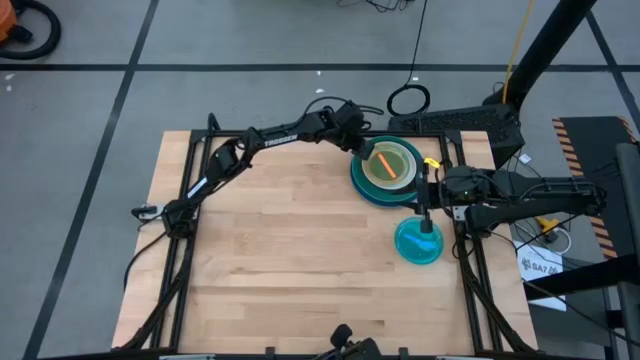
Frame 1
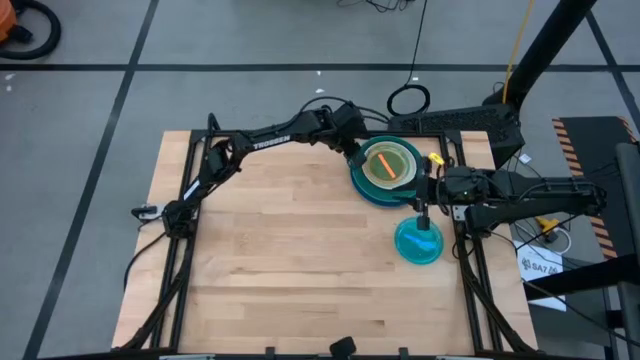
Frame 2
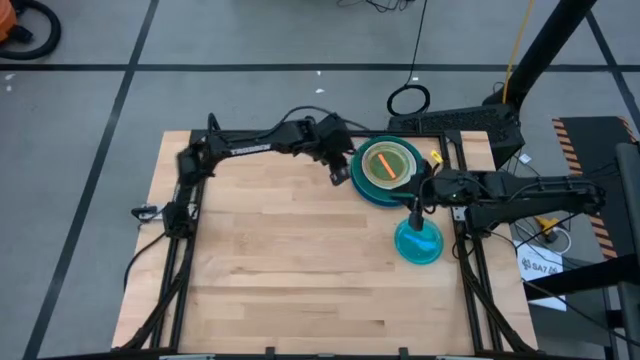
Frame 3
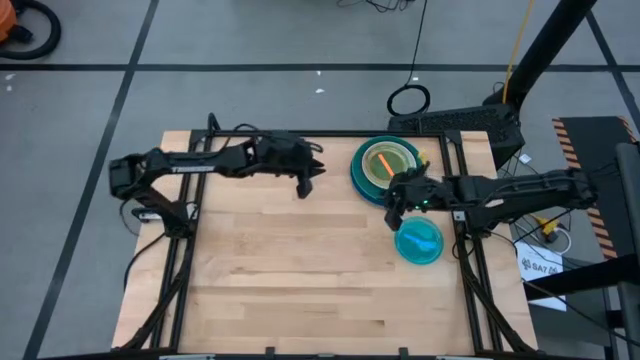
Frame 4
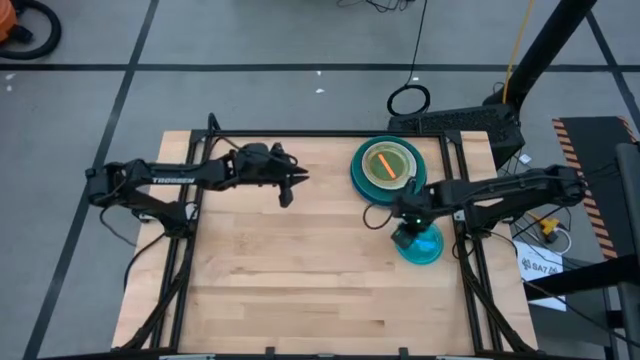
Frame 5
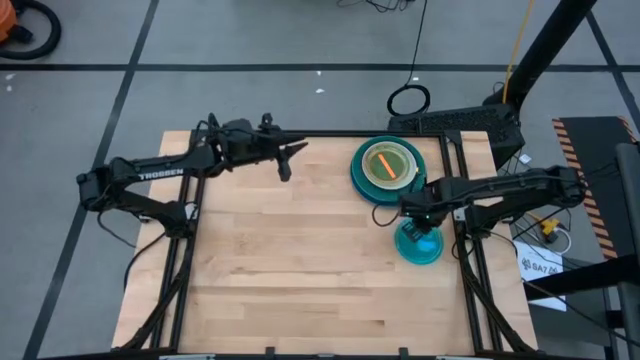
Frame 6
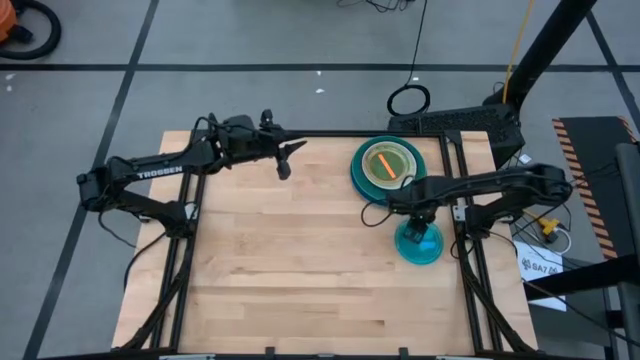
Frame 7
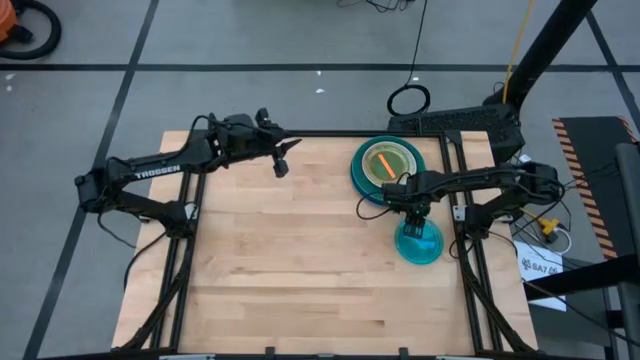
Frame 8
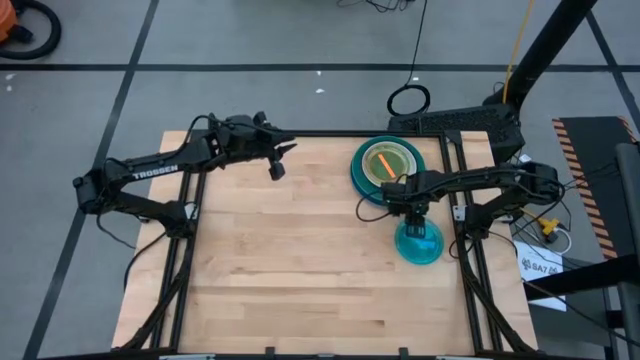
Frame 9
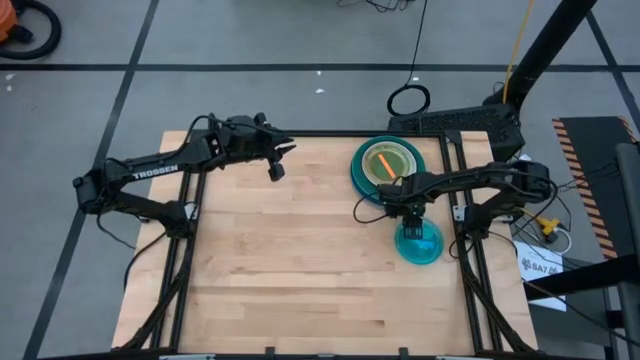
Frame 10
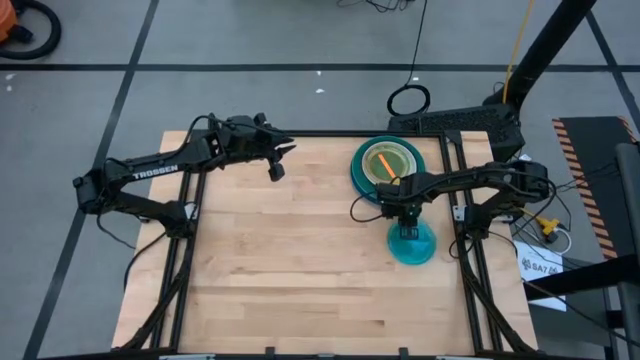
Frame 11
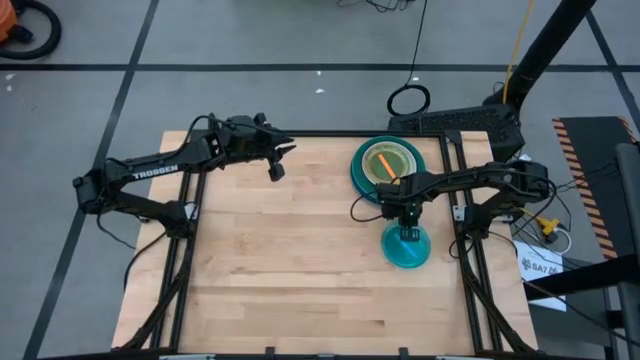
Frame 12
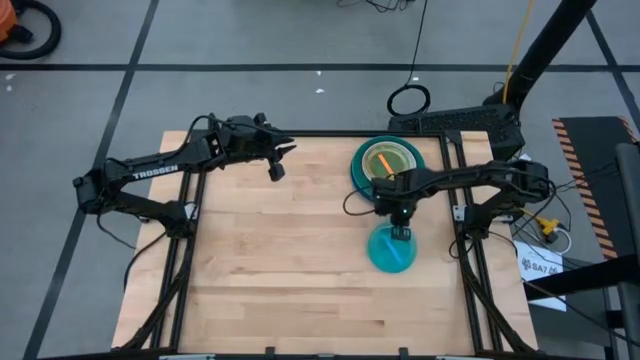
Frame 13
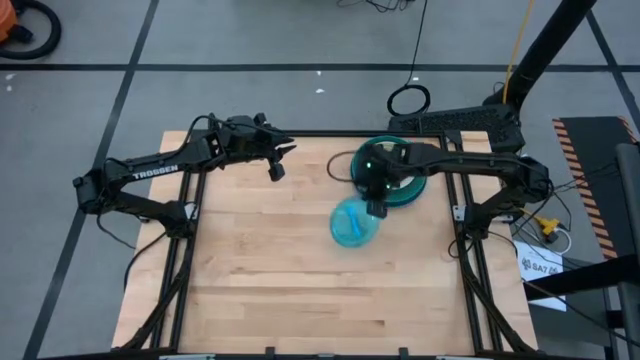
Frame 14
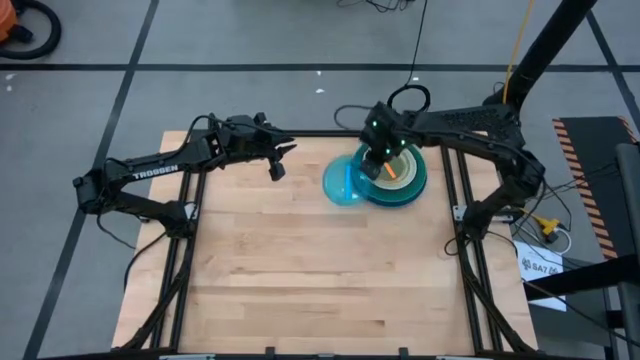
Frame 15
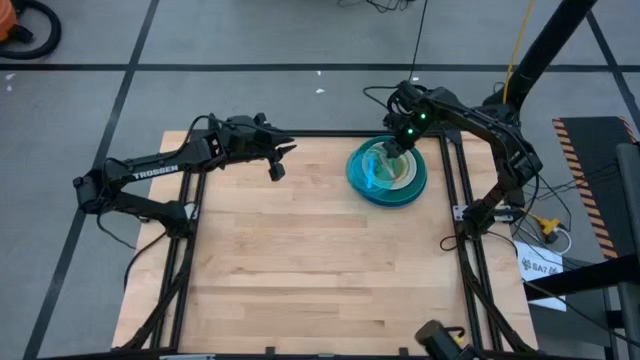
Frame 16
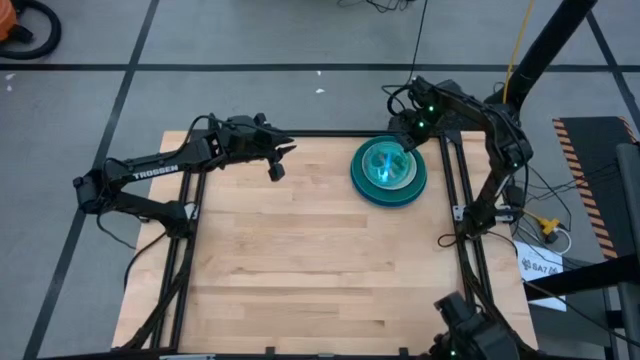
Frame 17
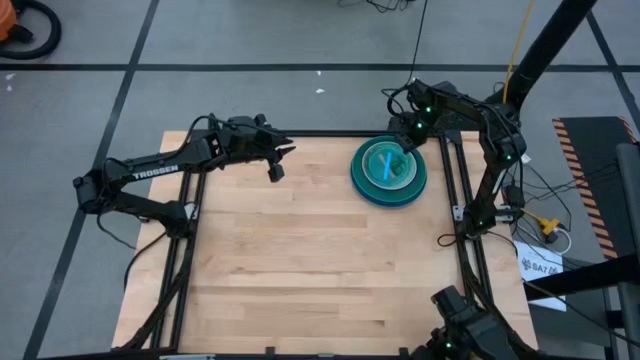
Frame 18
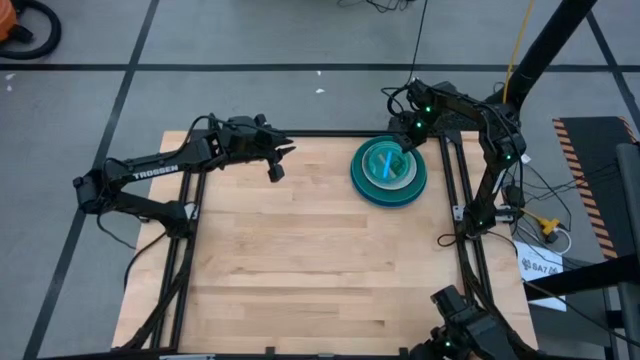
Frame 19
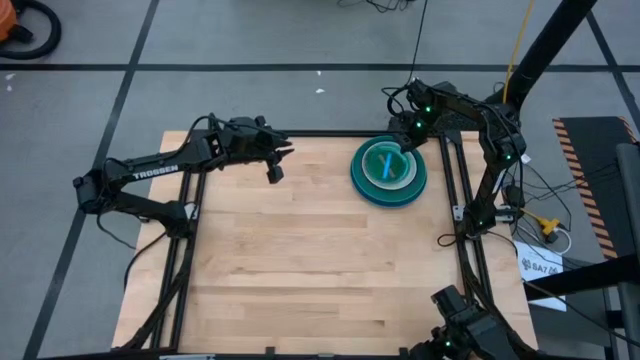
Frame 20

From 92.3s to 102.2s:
Task: Stack plastic plates
Stack the light blue plate on top of the orange plate

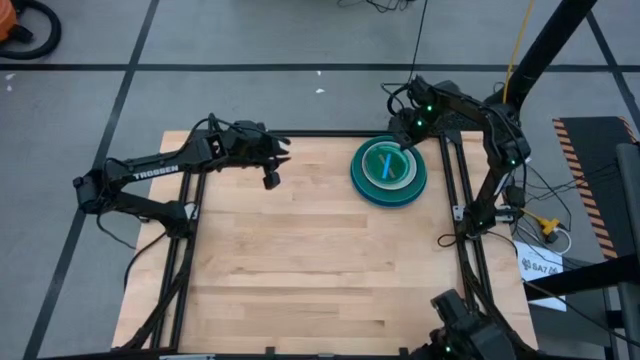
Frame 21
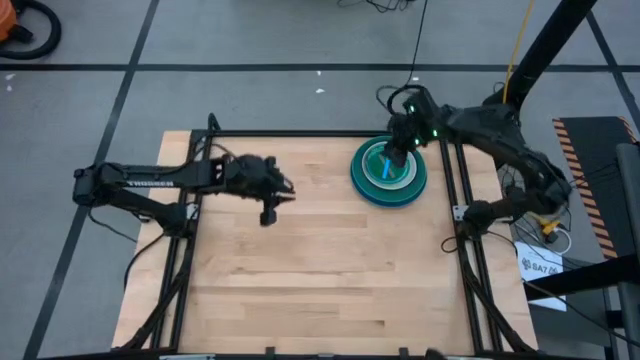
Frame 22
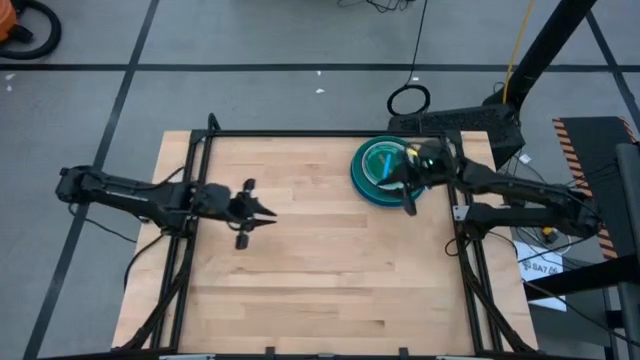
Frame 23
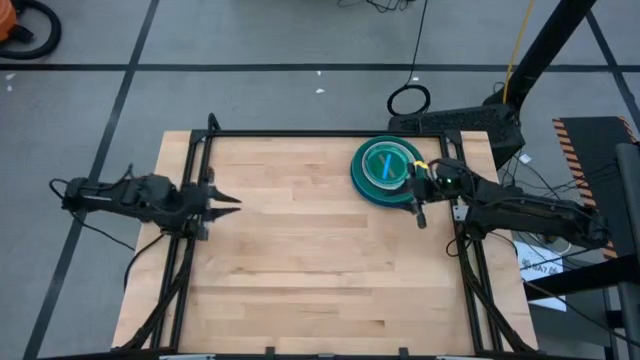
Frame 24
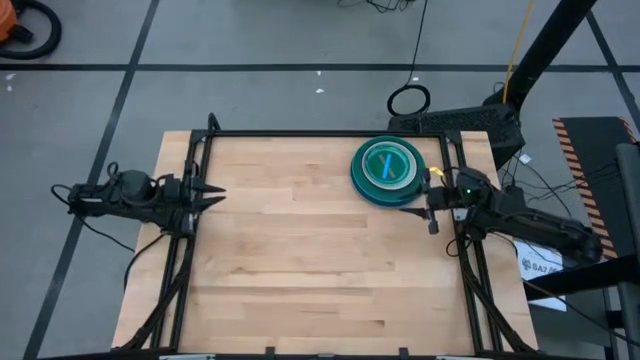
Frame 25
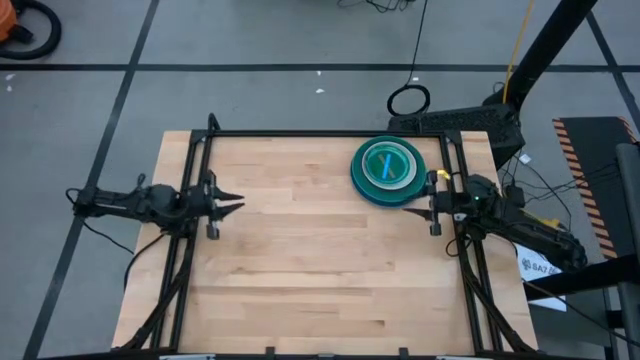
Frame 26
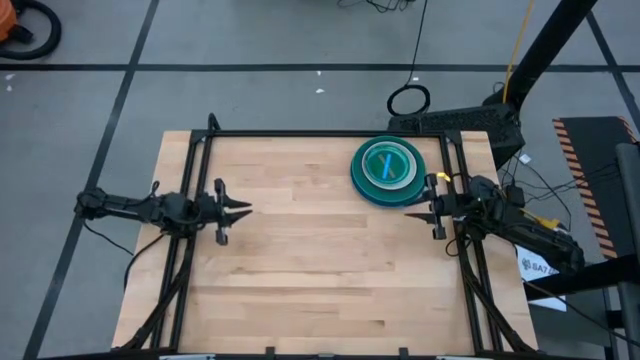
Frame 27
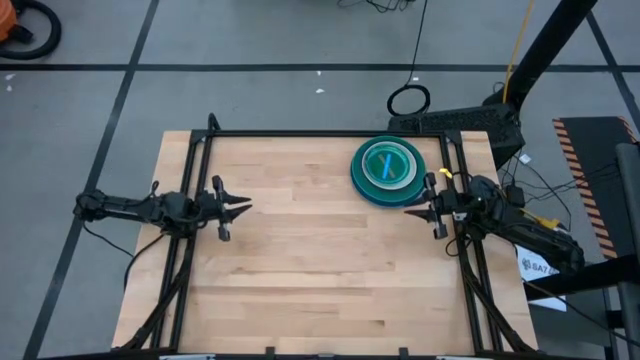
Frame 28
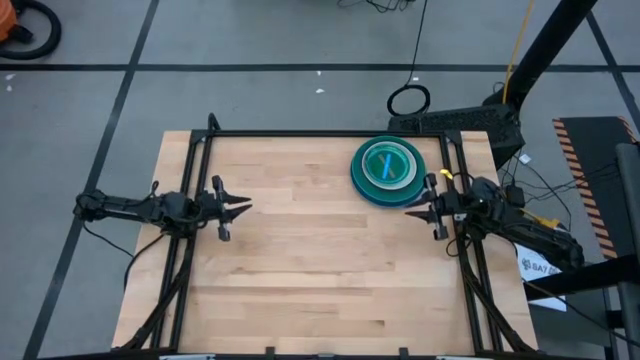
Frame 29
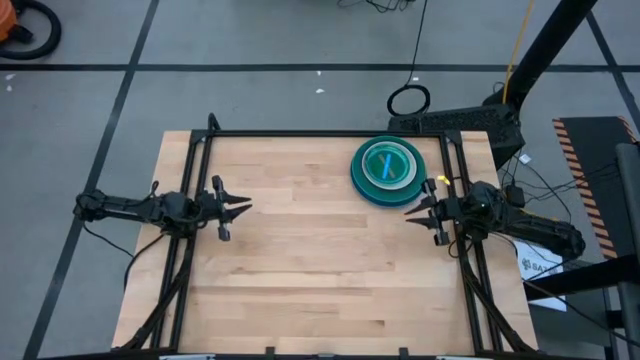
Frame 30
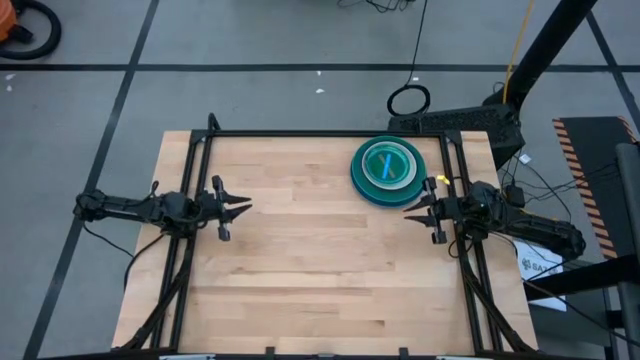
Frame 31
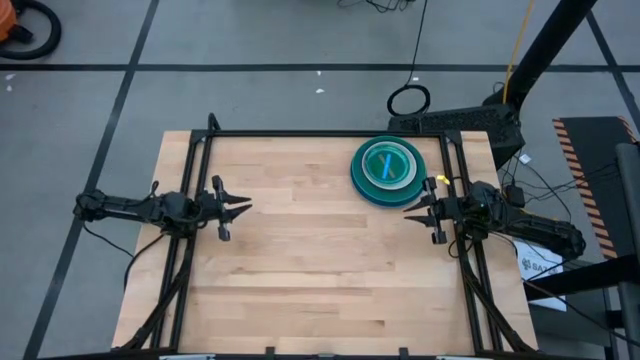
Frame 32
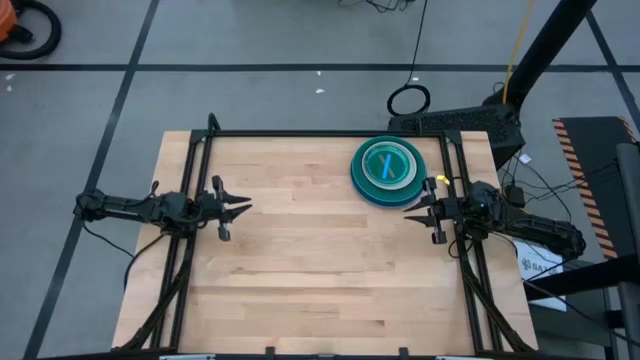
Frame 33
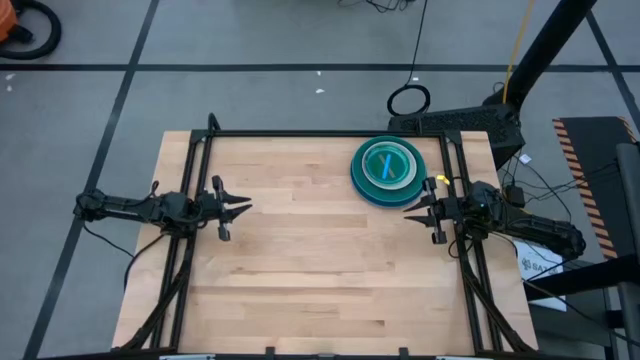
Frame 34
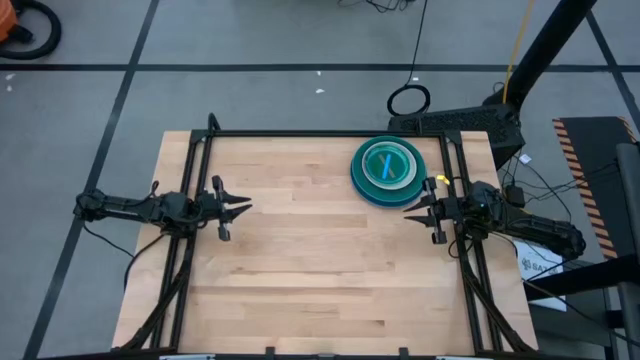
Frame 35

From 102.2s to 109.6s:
Return to Home Position

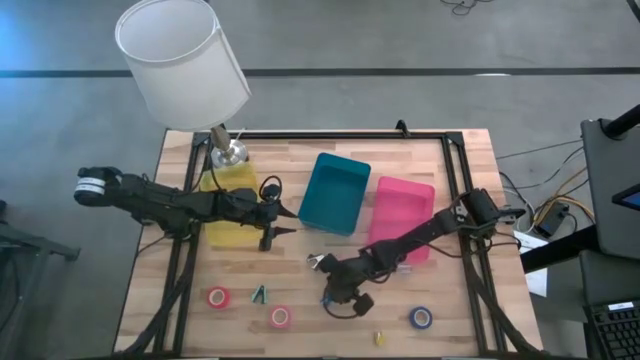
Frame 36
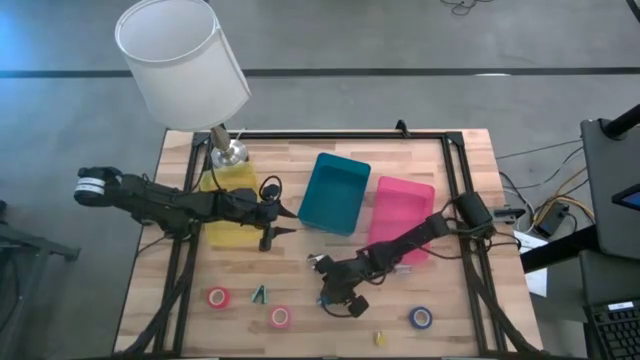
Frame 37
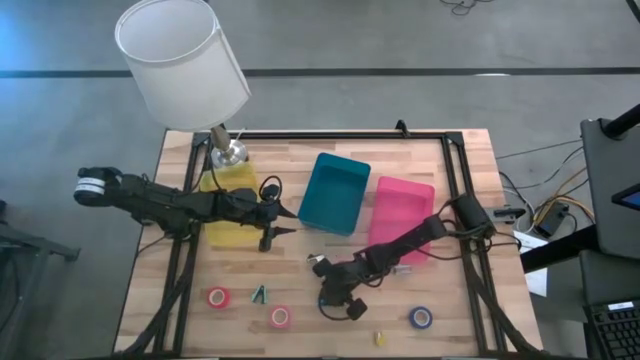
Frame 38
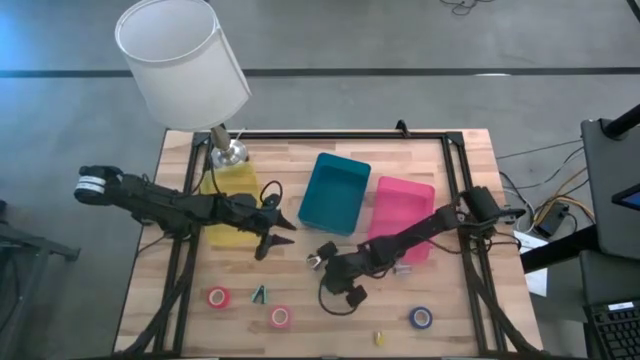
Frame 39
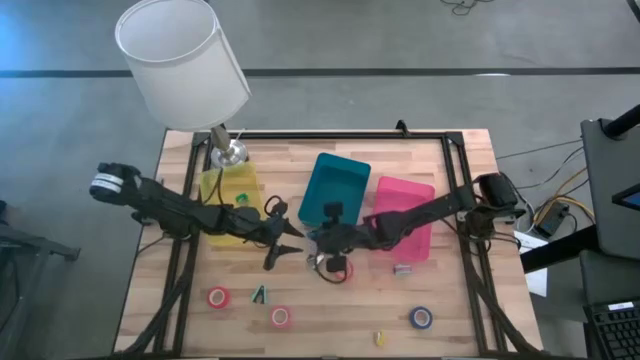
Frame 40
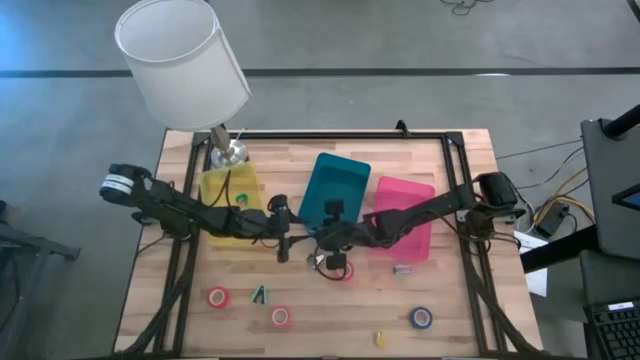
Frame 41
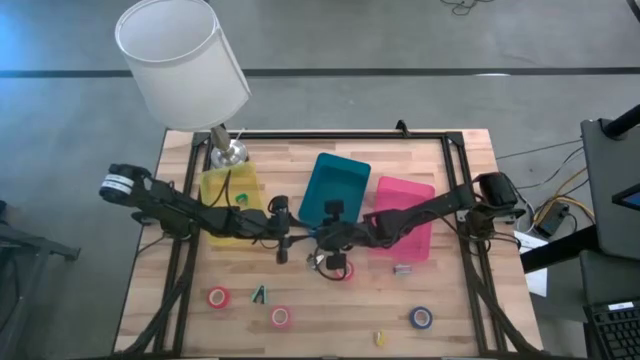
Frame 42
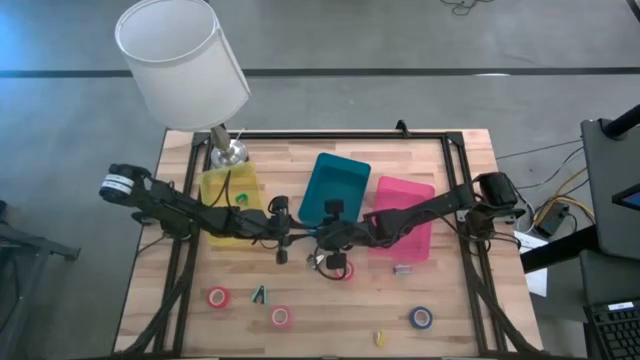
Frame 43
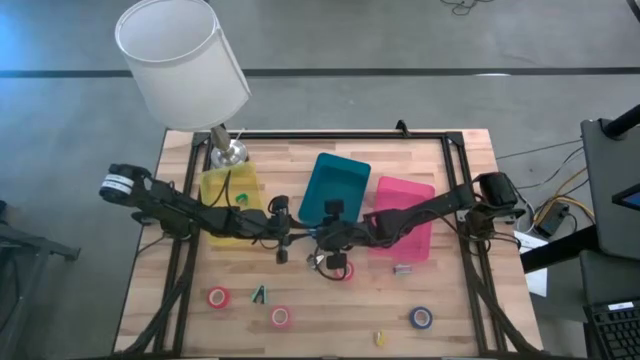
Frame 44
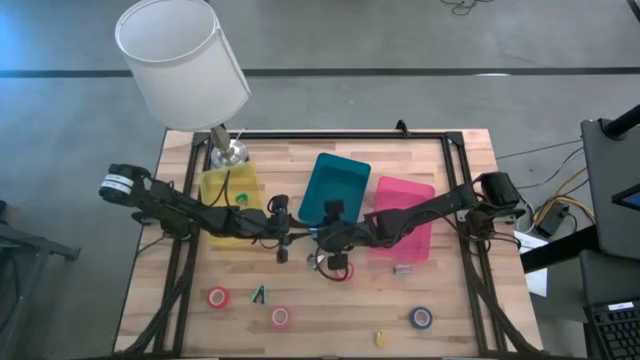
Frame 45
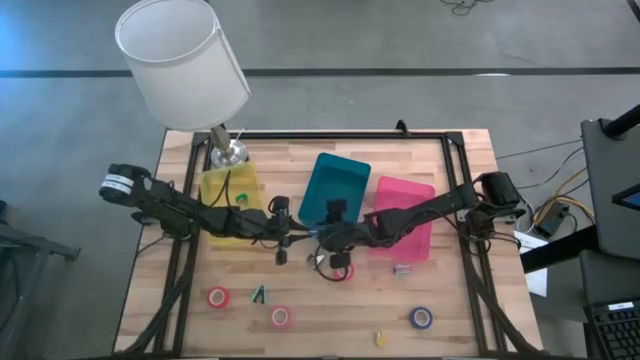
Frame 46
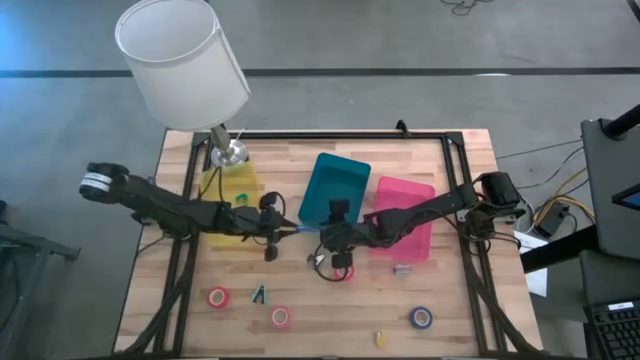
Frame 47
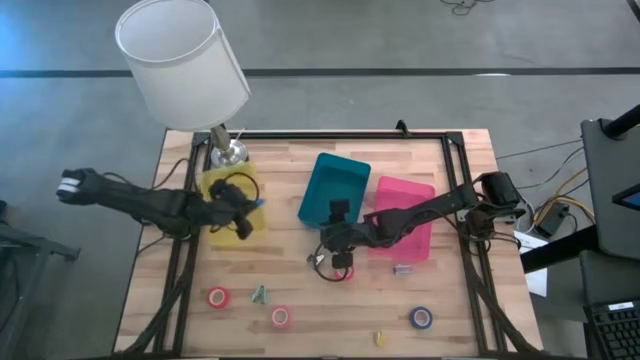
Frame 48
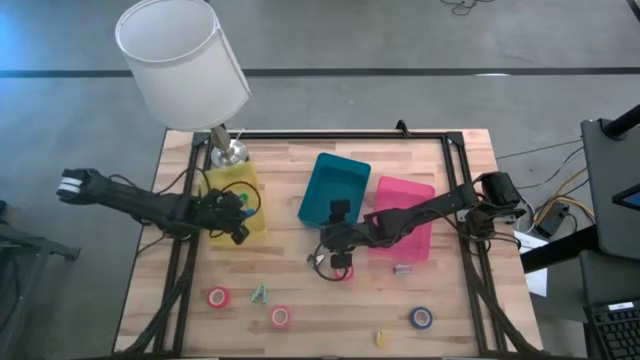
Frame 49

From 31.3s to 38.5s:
Task: Pick and place Stapler, Stapler remover, tape
Put the blue stapler into the yellow bin
